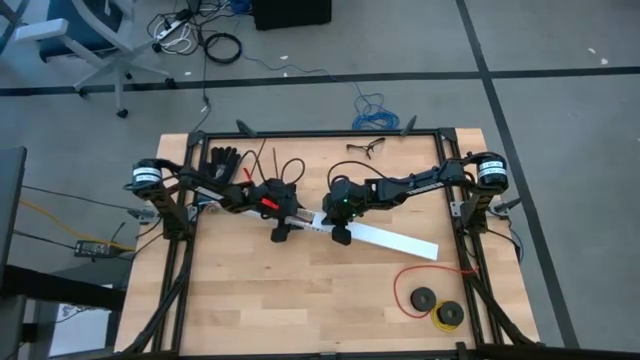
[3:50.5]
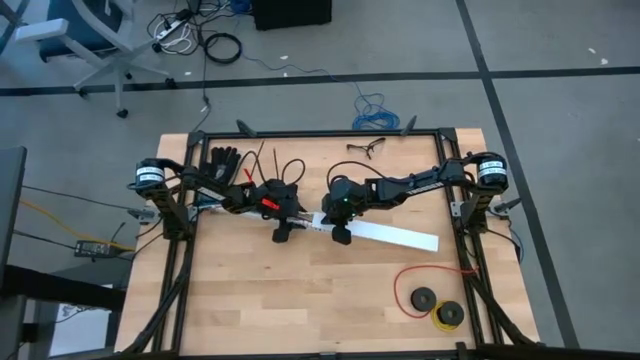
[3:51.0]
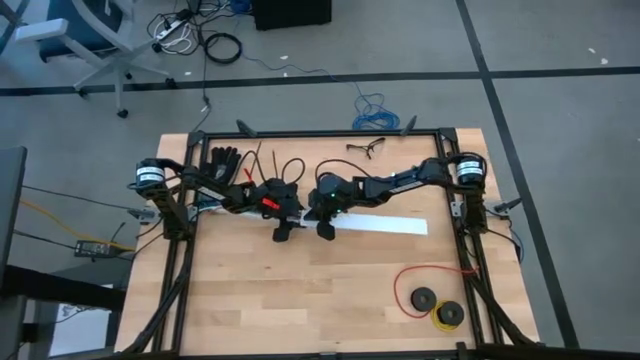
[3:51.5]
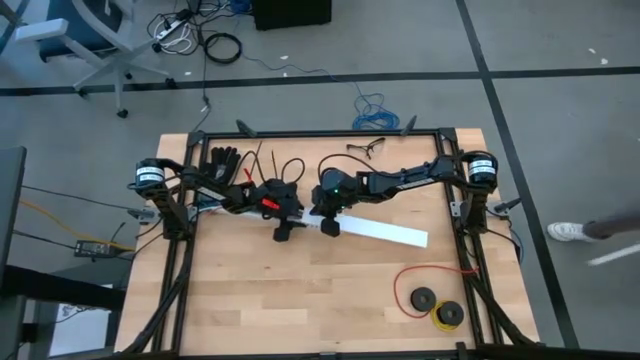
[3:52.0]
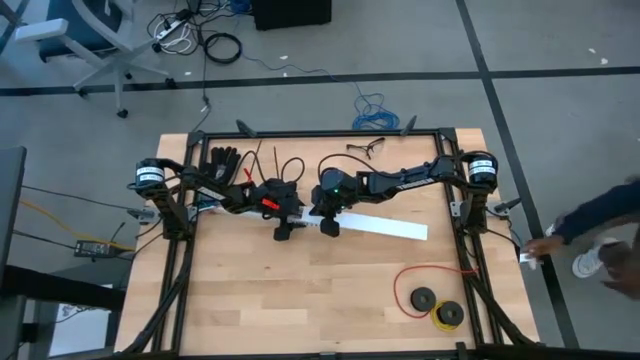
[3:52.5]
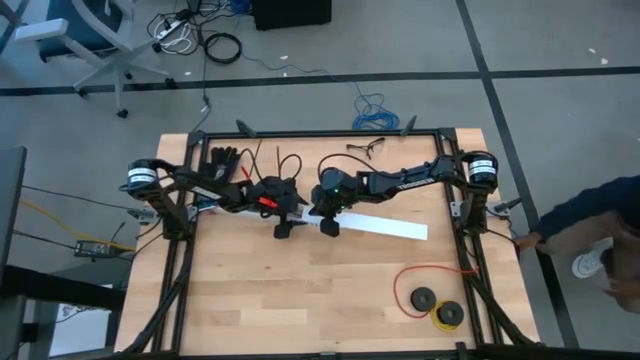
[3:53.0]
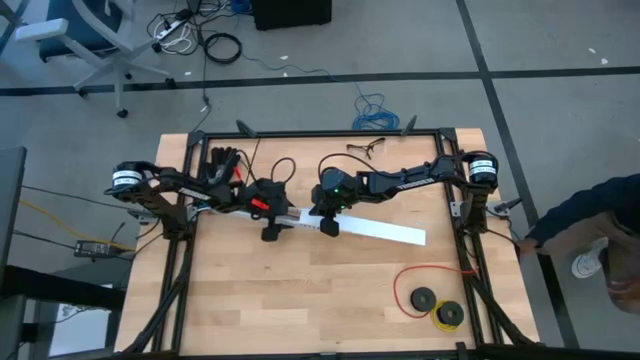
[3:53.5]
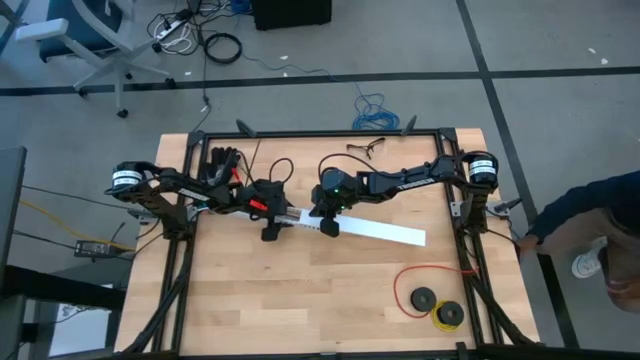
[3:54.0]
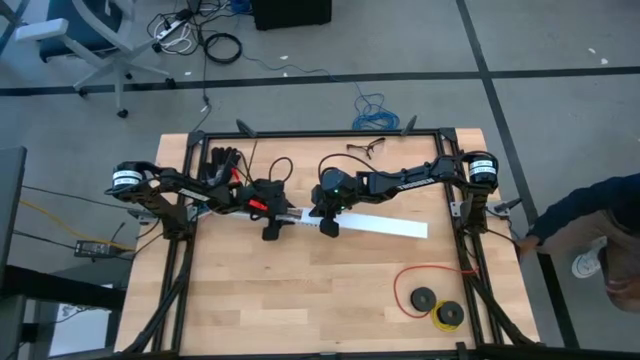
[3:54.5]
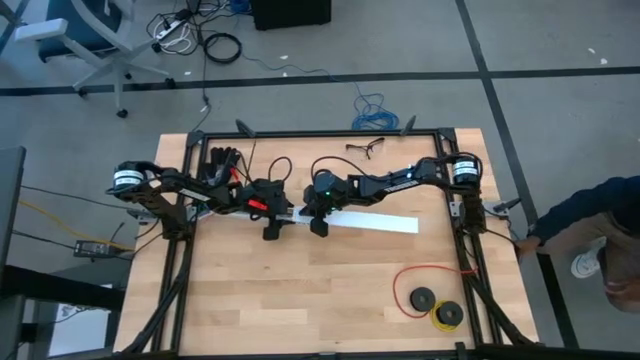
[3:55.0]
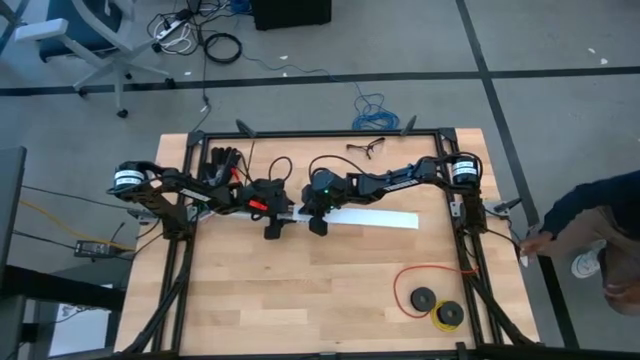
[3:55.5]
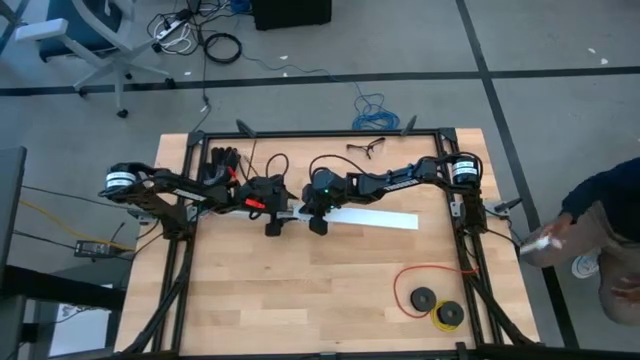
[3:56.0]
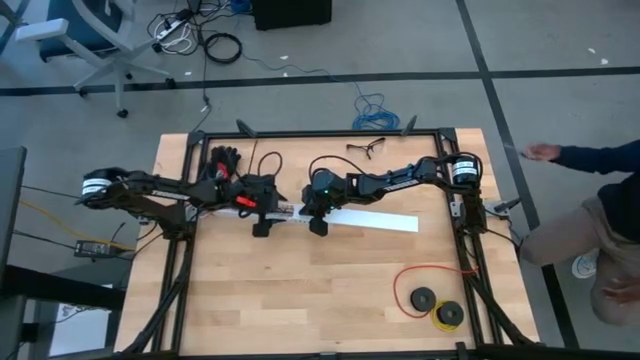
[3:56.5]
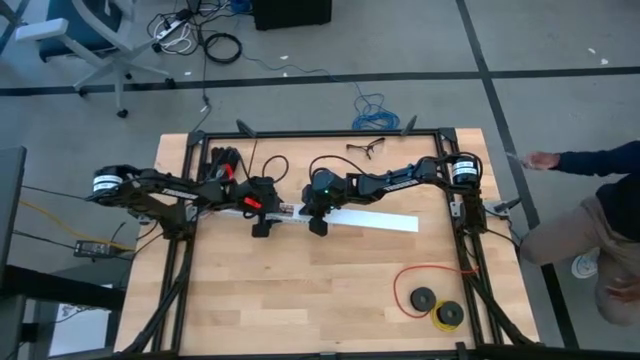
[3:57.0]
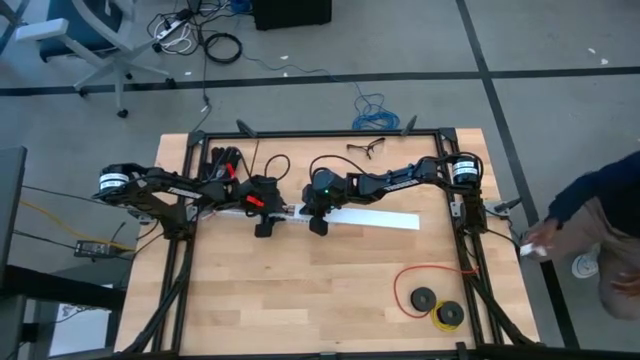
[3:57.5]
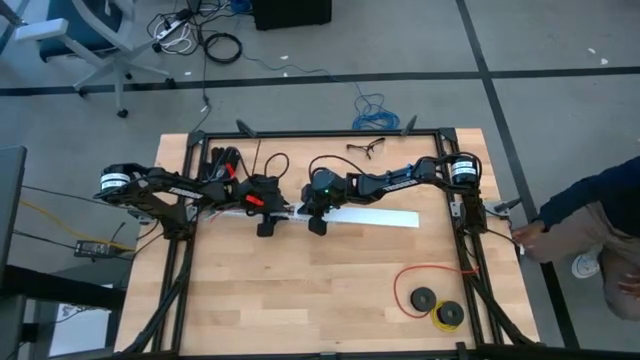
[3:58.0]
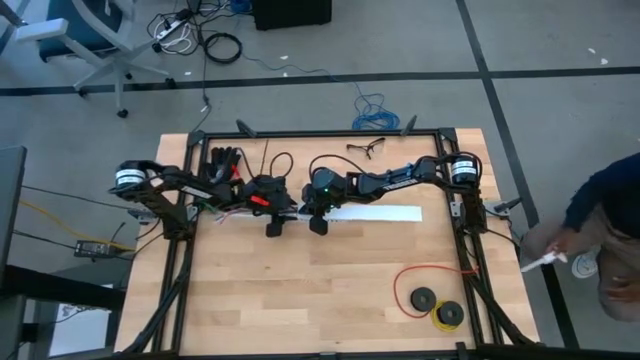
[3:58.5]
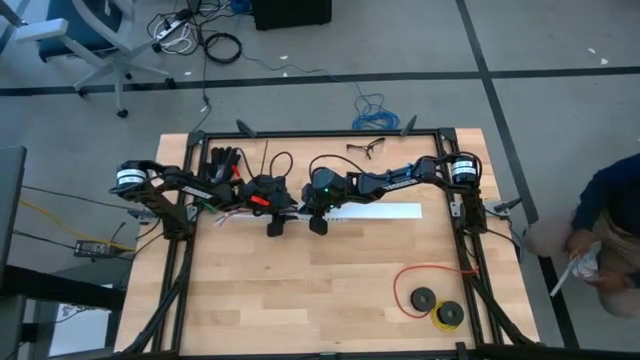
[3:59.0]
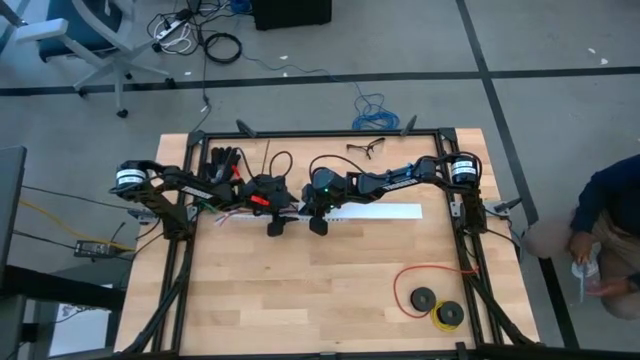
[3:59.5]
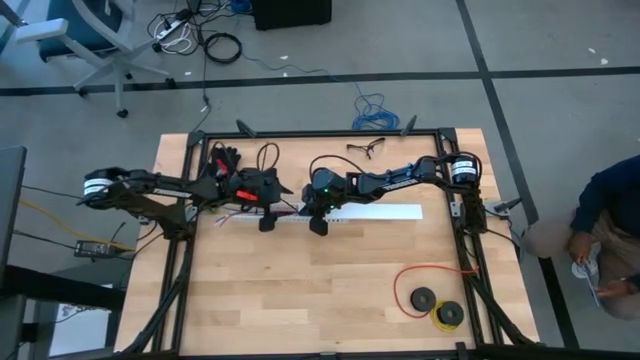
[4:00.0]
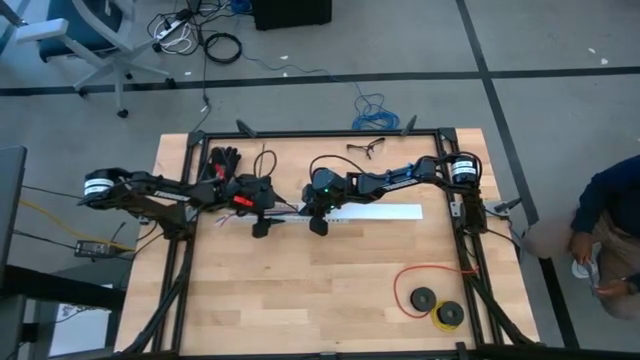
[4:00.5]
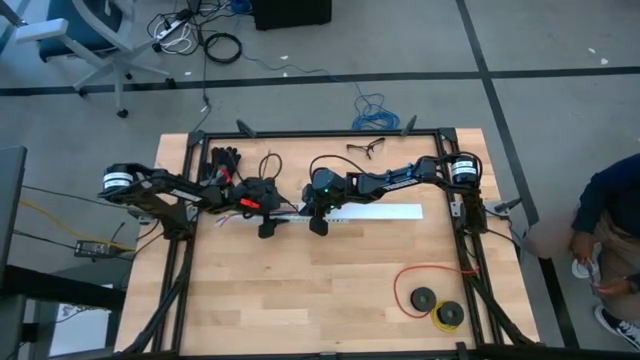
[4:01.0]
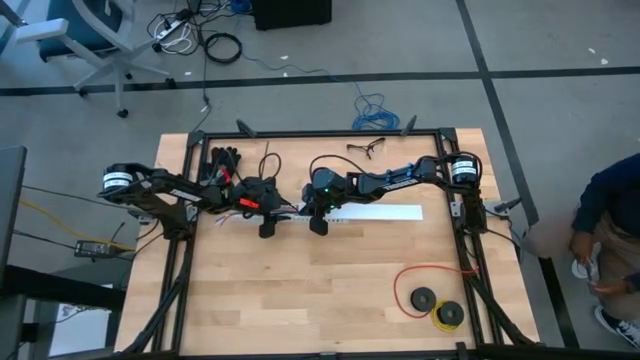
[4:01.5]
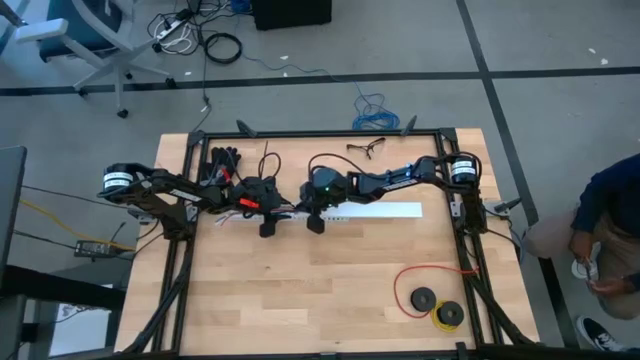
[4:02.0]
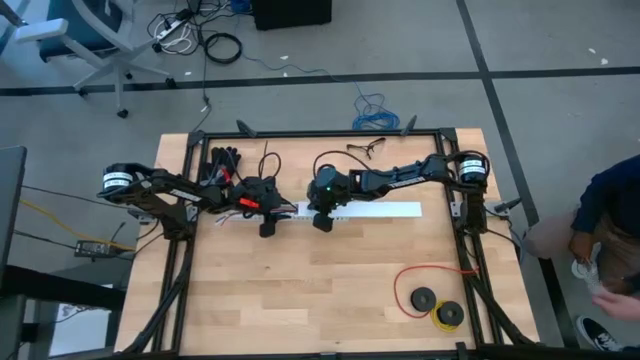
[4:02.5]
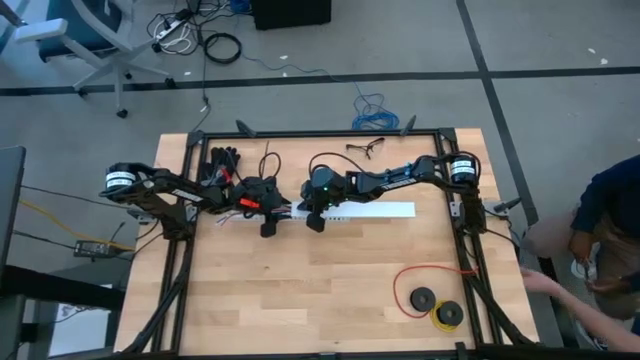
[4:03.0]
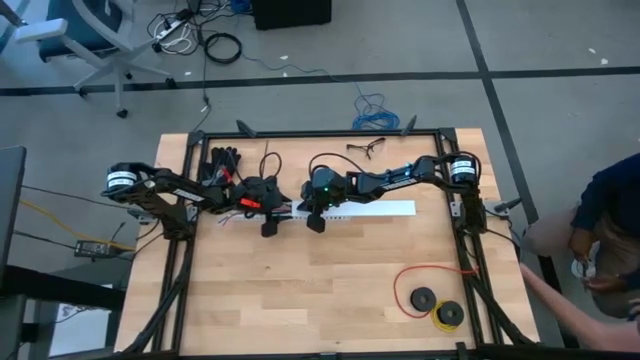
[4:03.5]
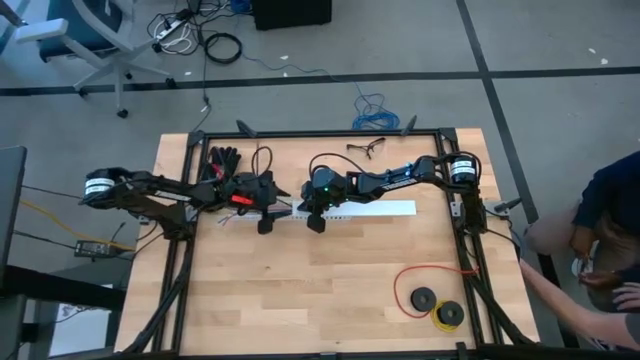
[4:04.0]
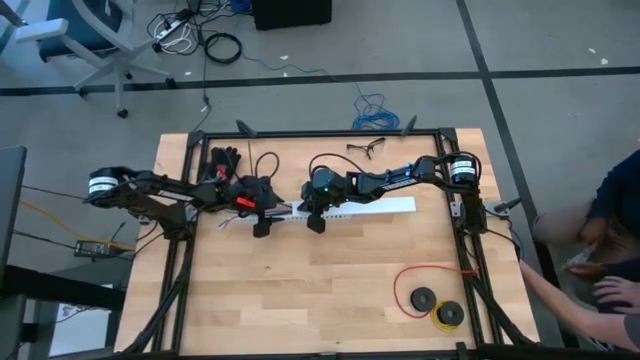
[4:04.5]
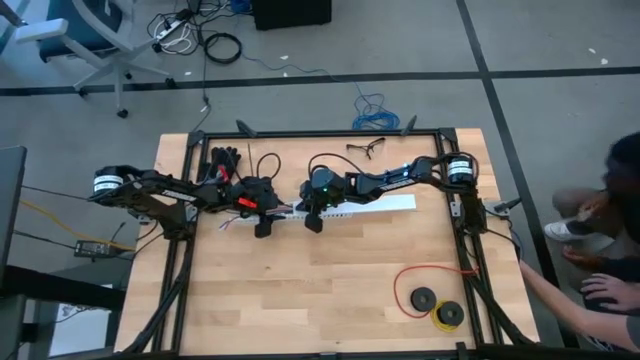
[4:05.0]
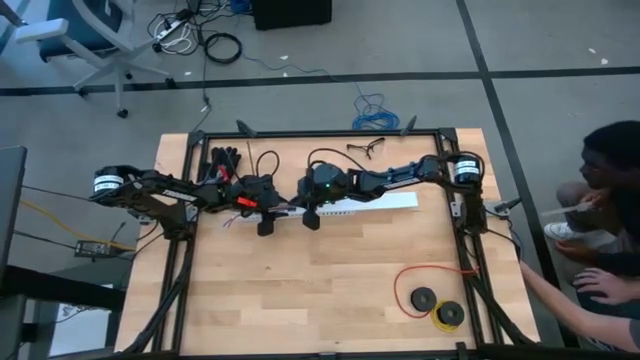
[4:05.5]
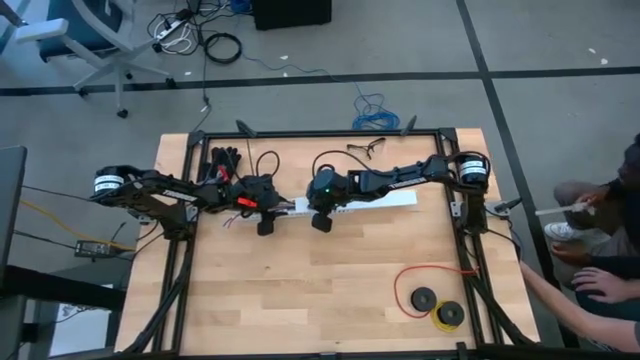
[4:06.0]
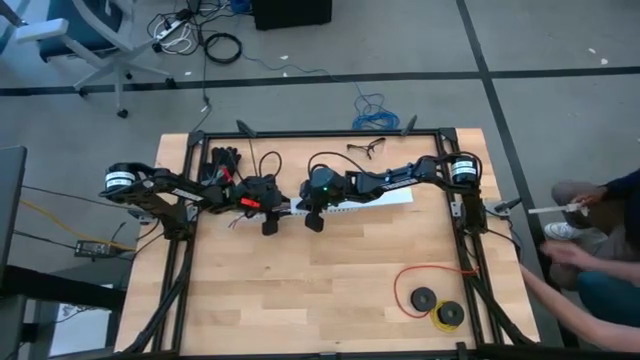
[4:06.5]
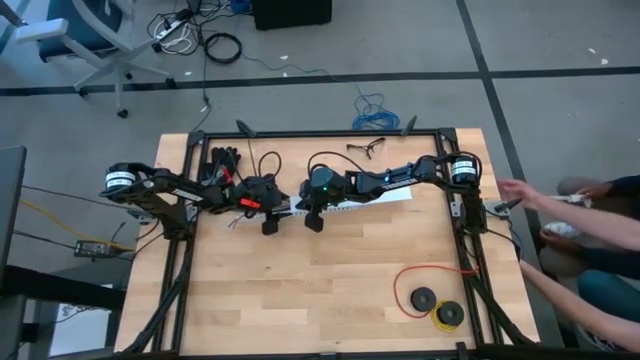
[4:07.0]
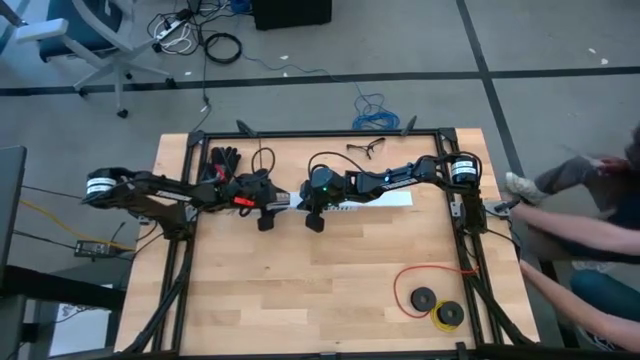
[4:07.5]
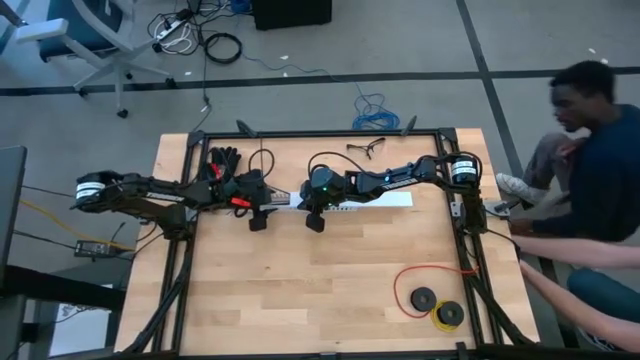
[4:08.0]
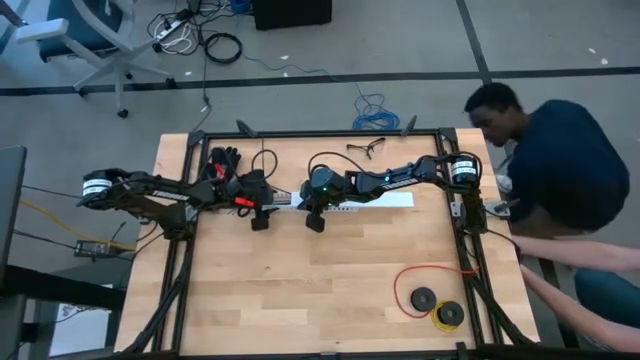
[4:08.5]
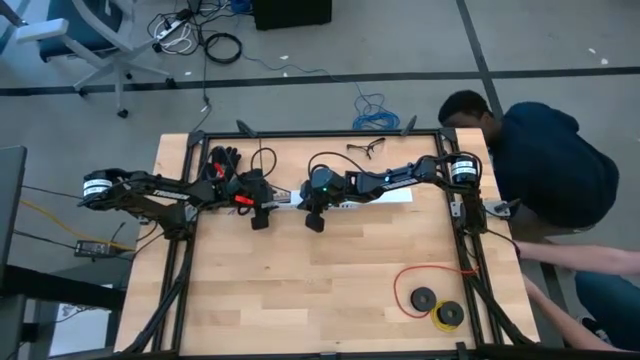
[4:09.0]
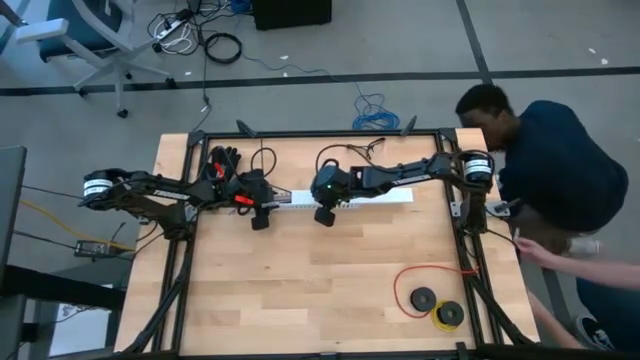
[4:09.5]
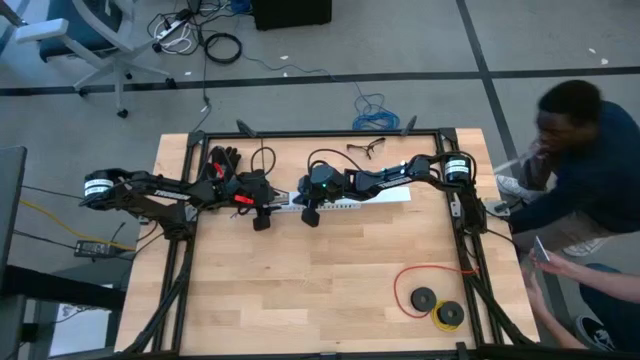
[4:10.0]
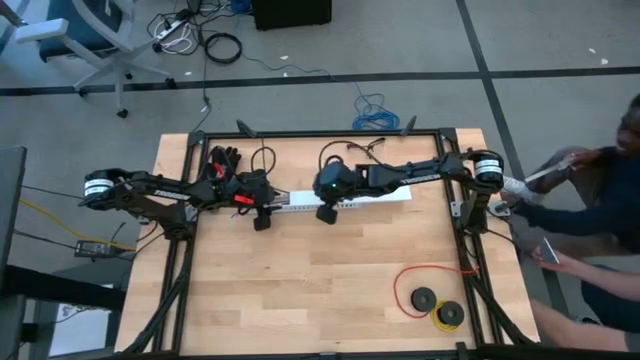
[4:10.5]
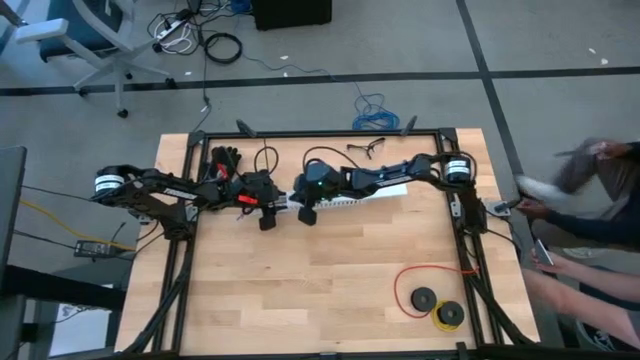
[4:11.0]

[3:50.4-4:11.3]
Task: Ziptie cables
Close the white cable duct
